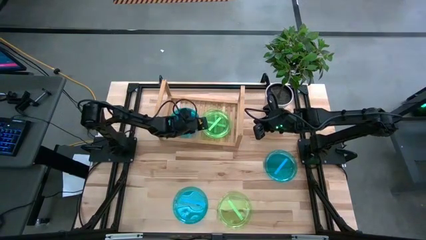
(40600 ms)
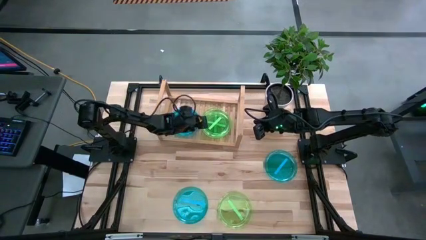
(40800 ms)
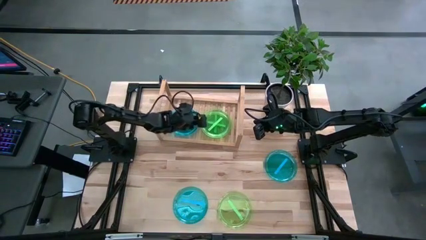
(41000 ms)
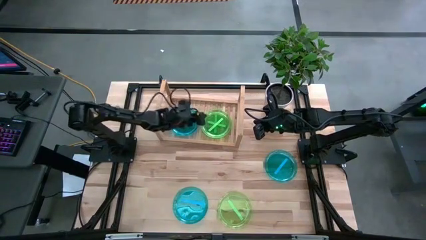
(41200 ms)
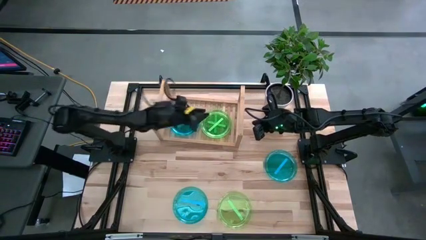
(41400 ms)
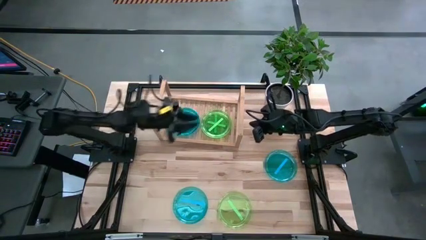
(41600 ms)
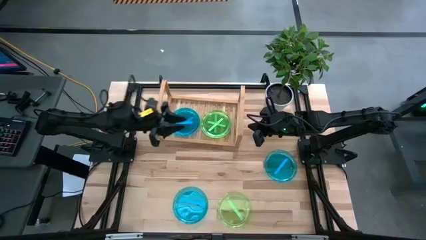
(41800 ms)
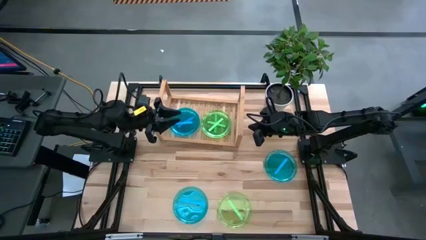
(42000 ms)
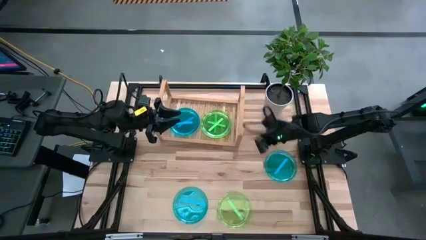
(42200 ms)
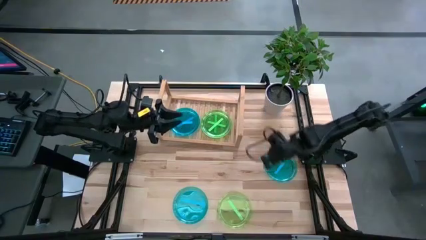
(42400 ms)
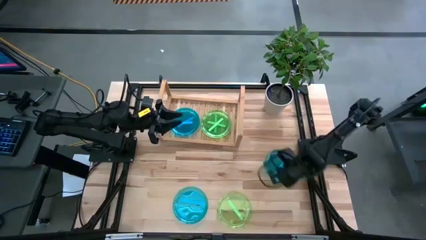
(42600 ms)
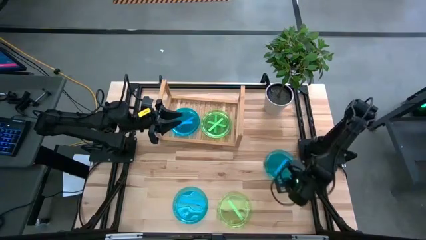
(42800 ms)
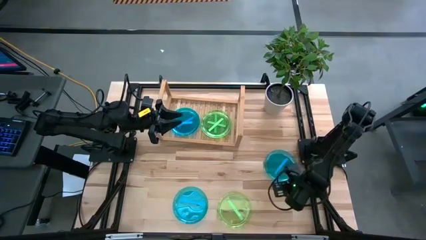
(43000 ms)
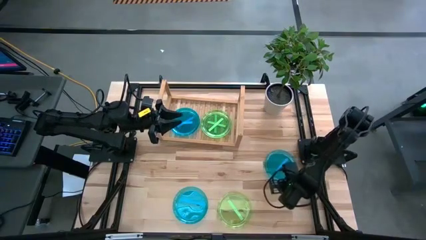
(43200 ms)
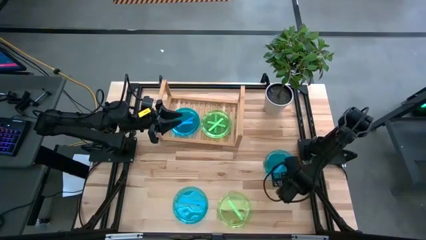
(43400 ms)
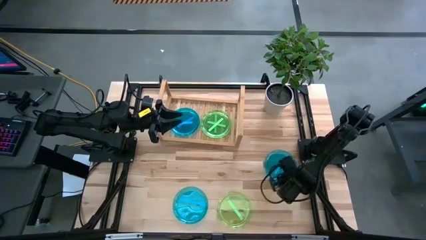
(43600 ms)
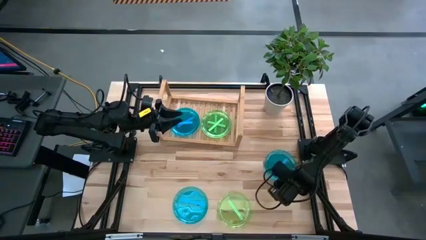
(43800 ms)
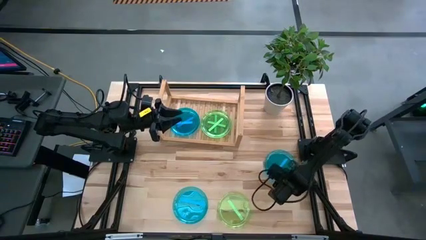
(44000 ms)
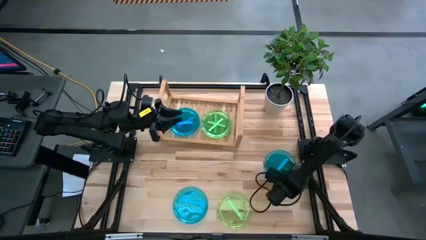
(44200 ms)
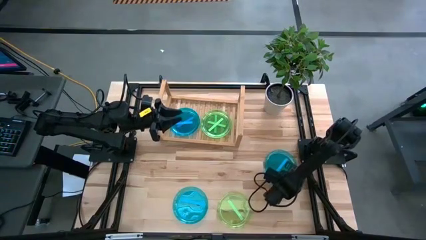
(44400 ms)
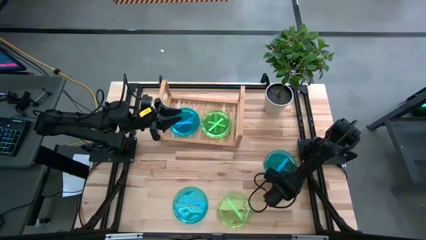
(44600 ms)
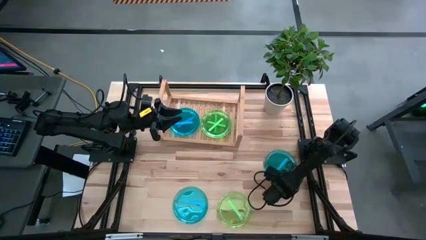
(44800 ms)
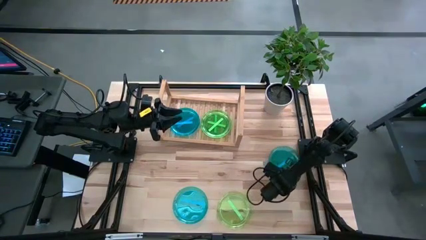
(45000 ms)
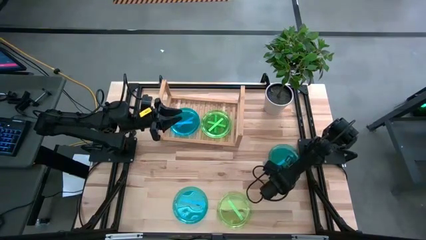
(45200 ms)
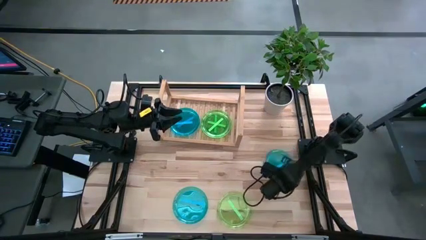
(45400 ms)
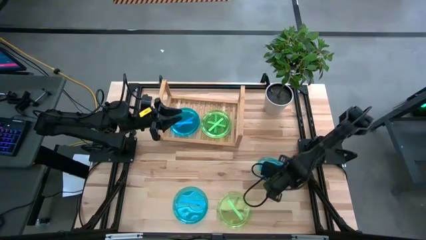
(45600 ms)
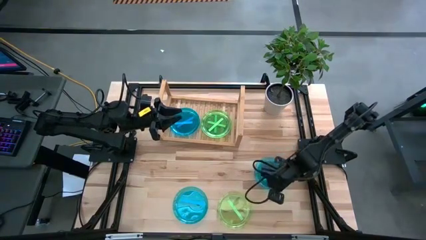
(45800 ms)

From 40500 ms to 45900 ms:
Task: Place and stack plates onto a shelf
Stack the top transparent blue plate on top of the transparent blue plate on the shelf

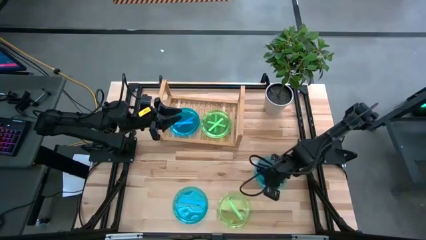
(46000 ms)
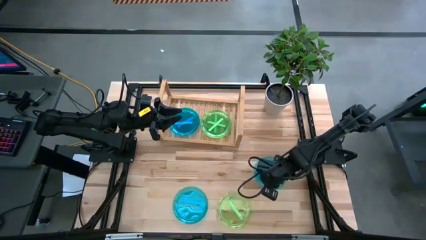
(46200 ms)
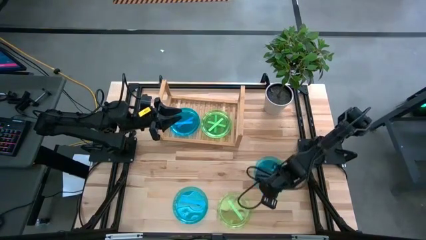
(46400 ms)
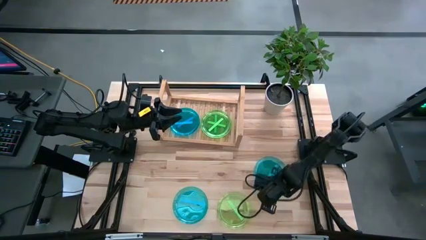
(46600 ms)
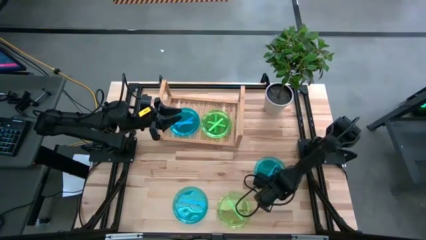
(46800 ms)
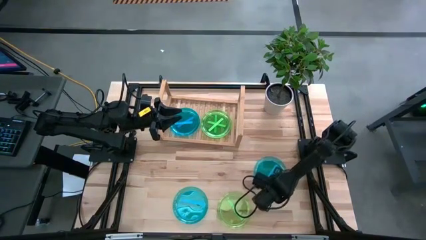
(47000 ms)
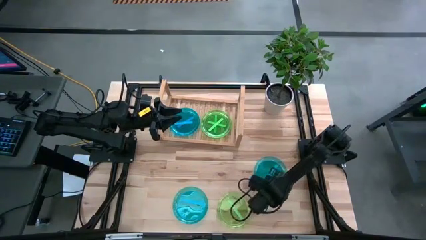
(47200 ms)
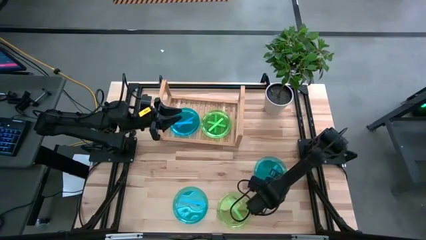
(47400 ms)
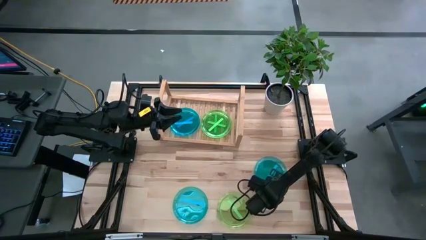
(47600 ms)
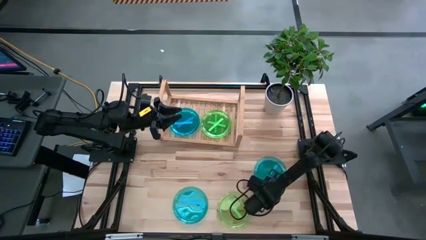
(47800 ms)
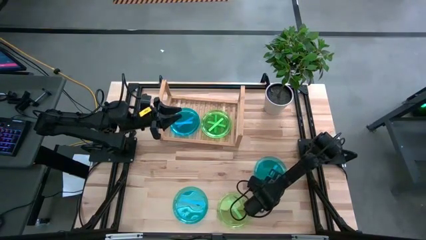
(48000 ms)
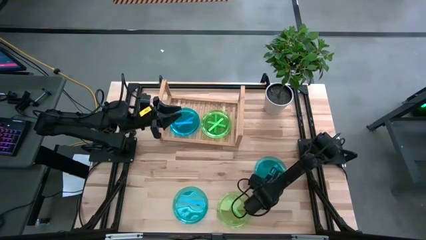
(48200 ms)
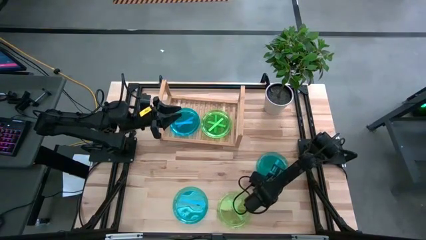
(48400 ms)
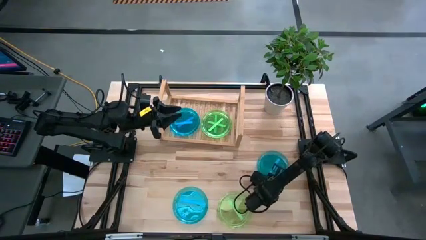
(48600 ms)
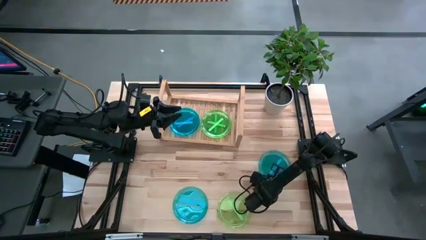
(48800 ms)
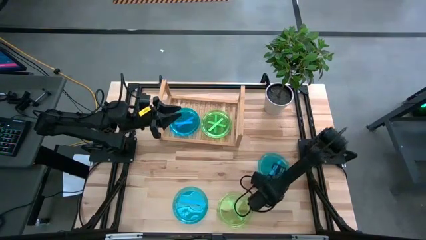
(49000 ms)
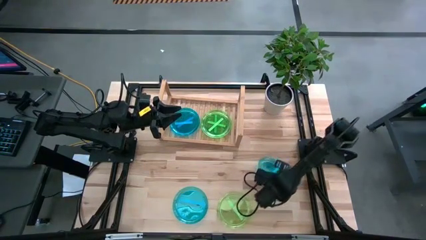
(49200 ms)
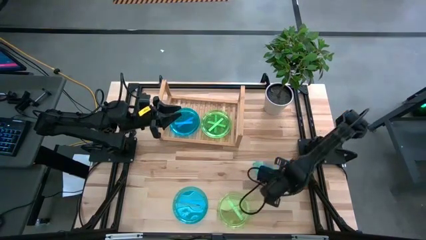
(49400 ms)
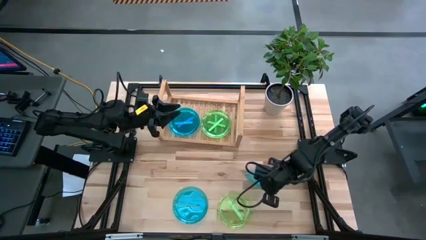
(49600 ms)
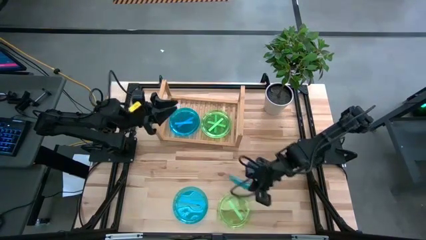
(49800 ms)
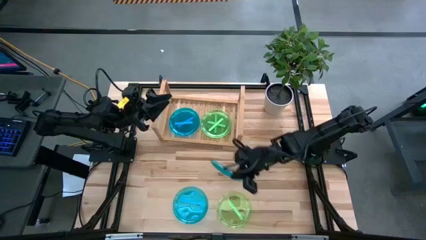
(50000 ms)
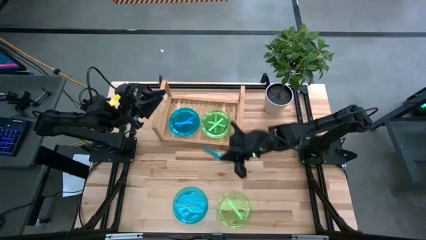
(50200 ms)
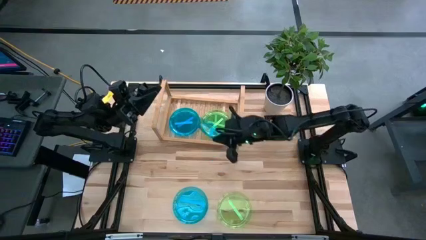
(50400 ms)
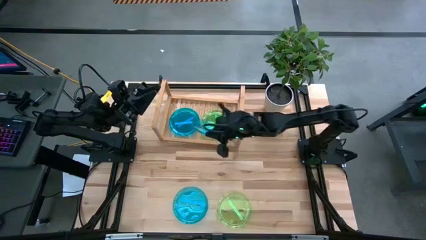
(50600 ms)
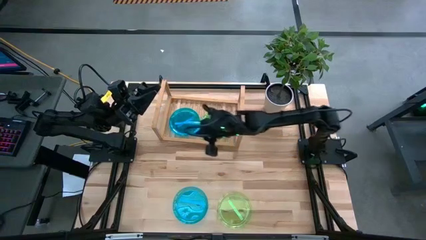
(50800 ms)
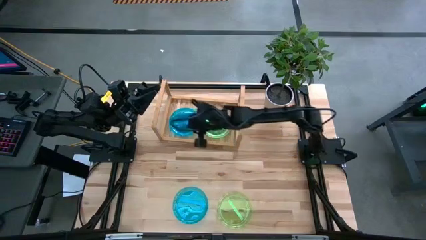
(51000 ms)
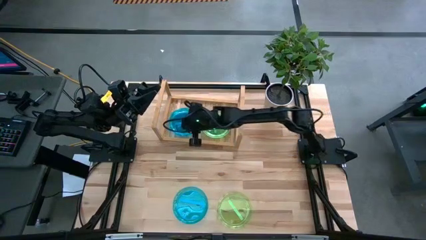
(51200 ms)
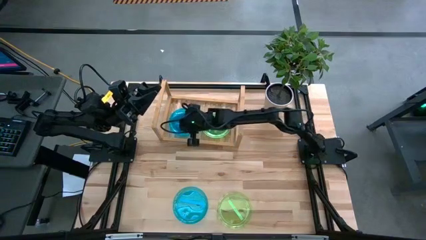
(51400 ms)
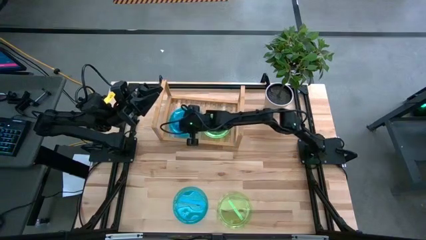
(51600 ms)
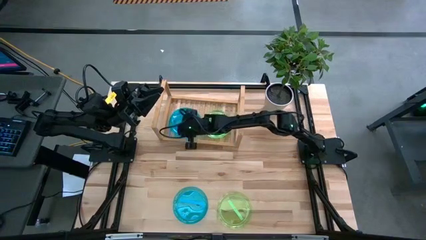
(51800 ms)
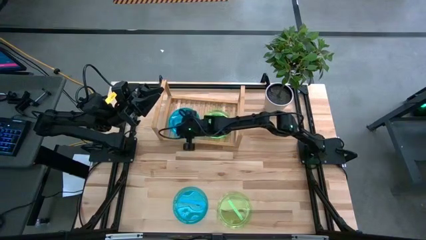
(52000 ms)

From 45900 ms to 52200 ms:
Stack the transparent blue plate on top of the transparent blue plate on the shelf

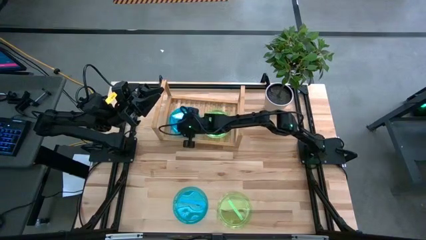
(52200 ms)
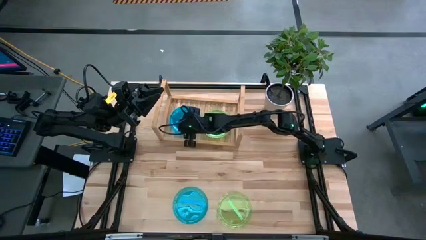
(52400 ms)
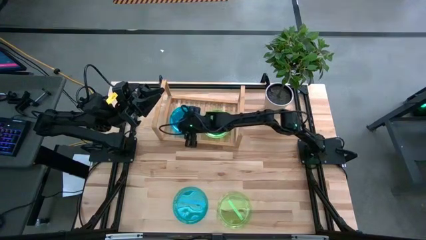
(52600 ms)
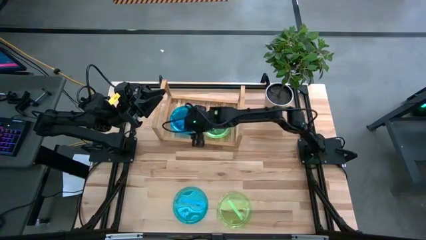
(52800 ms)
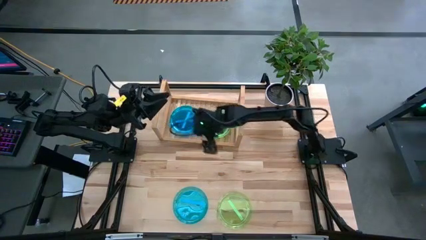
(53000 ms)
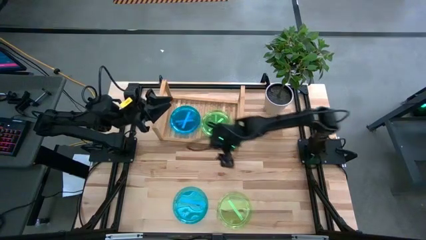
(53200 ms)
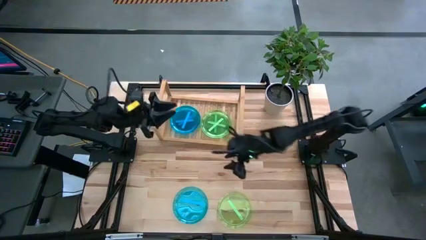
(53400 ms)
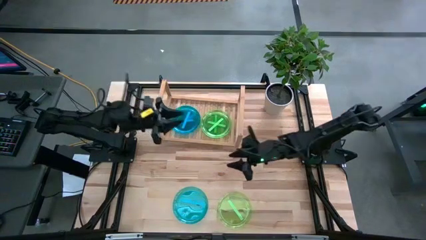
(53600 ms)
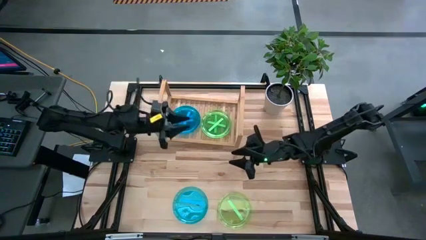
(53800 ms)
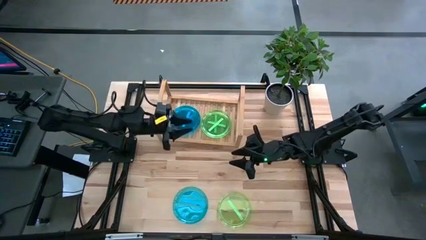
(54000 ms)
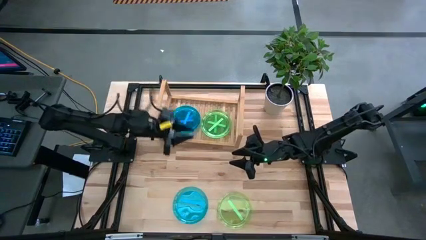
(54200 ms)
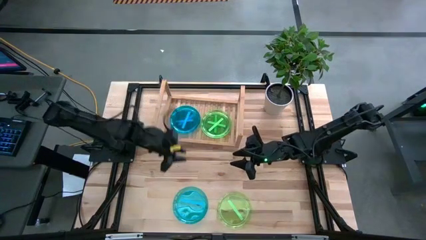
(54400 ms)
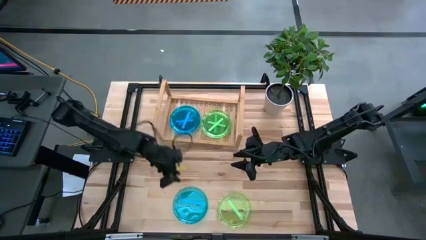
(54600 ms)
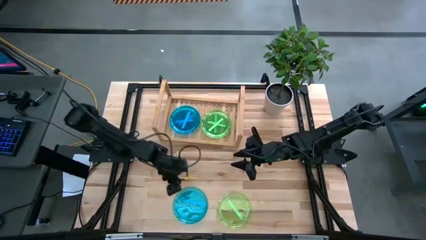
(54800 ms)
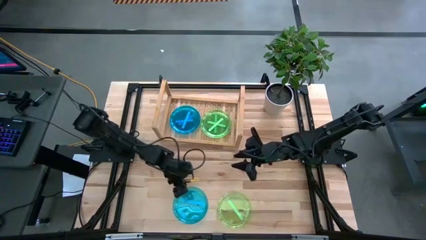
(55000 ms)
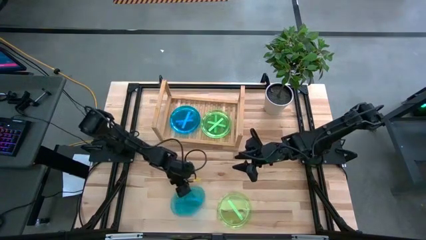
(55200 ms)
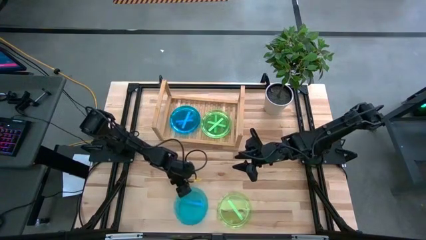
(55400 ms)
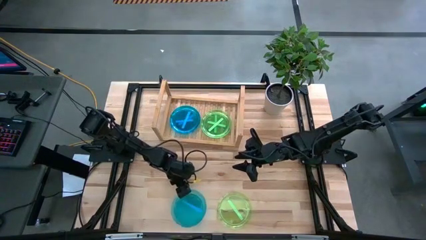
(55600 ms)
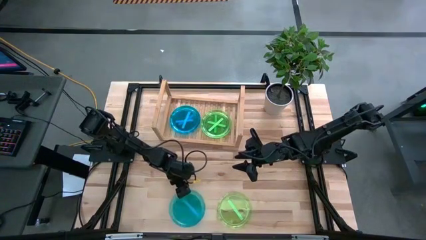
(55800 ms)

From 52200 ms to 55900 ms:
Stack the transparent blue plate on top the transparent blue plate on the shelf

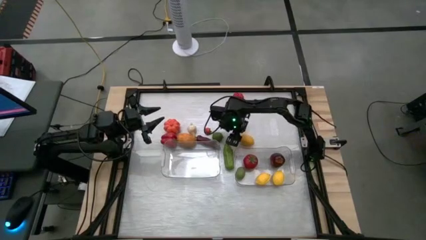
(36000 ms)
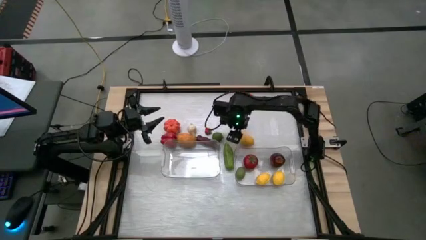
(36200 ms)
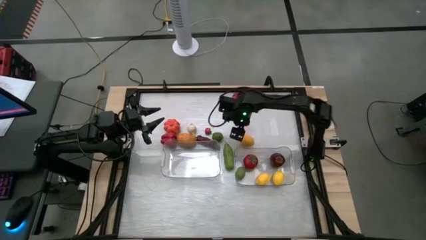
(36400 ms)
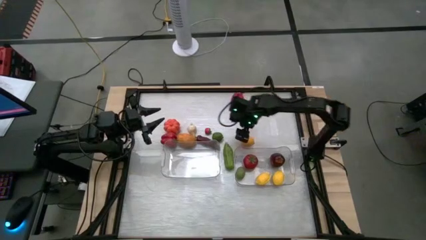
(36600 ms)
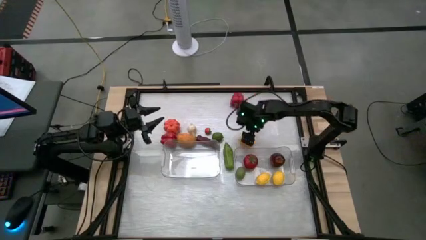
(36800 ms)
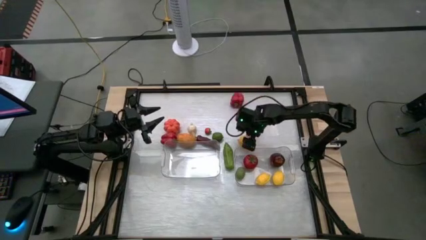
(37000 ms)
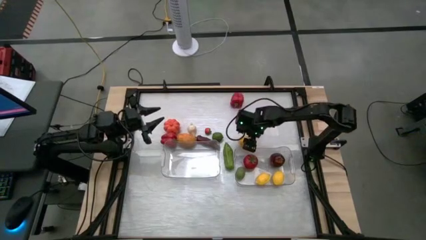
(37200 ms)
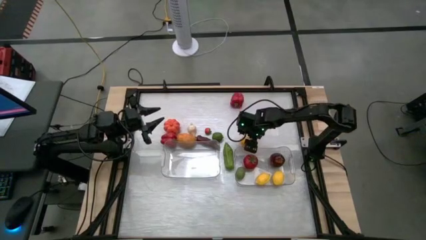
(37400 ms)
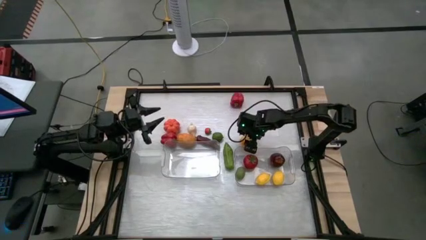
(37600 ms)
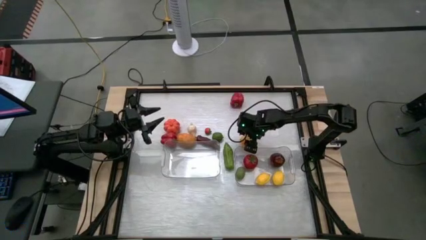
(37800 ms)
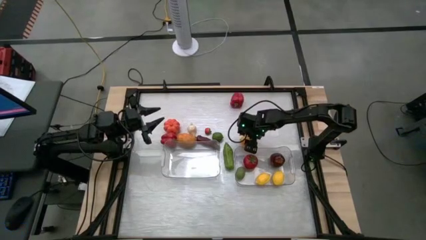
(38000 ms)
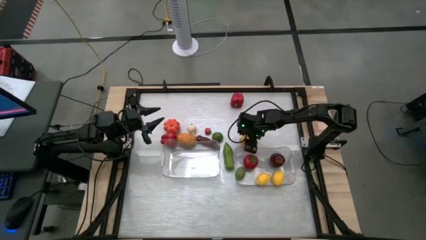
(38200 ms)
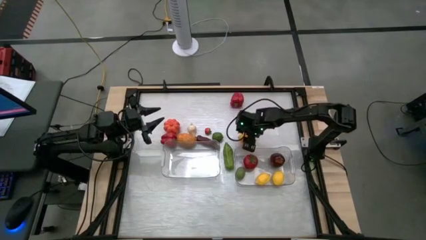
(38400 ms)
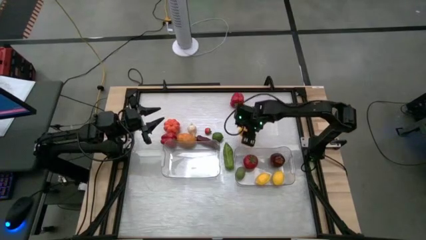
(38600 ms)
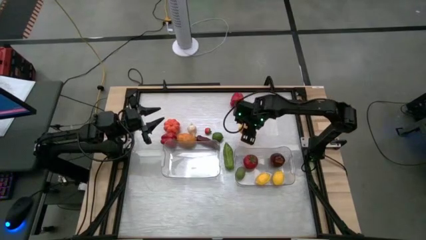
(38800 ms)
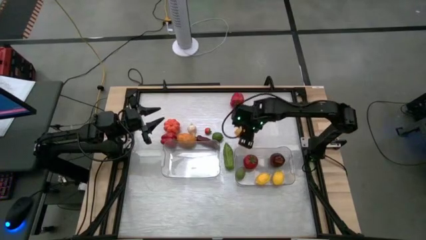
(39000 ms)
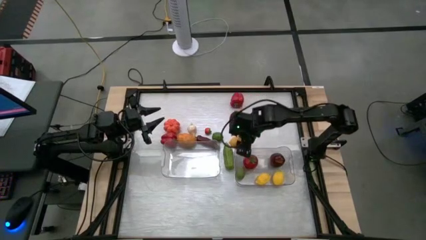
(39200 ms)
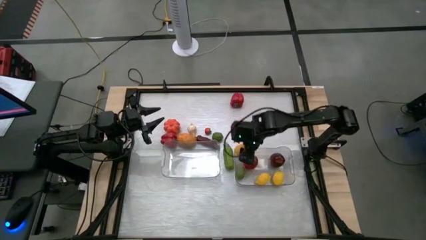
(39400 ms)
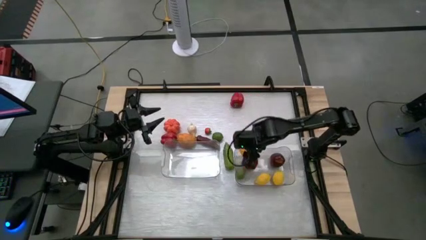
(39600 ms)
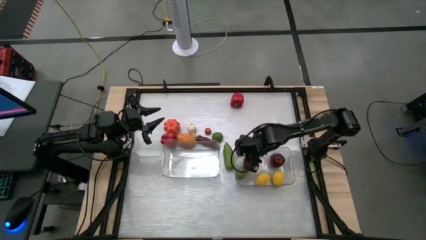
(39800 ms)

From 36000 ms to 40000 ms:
Task: Sort produce into baskets
Put the lemon into the right transparent bin
